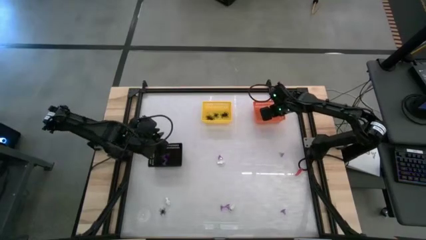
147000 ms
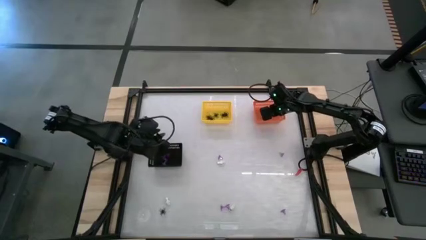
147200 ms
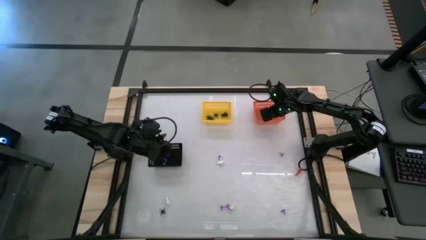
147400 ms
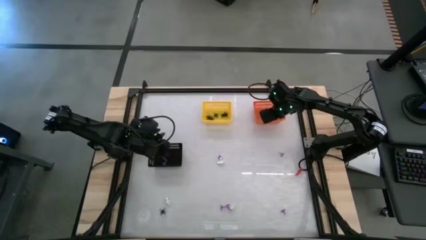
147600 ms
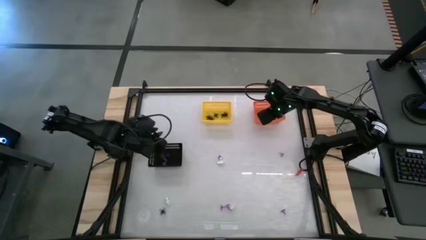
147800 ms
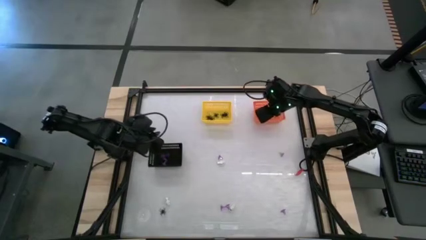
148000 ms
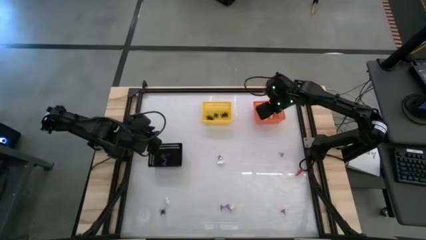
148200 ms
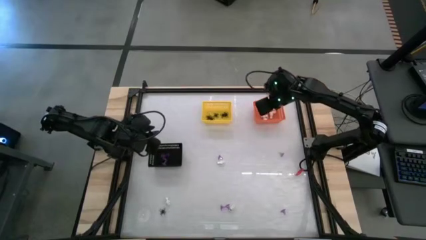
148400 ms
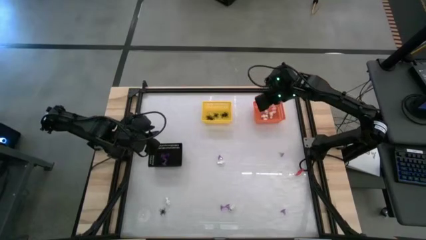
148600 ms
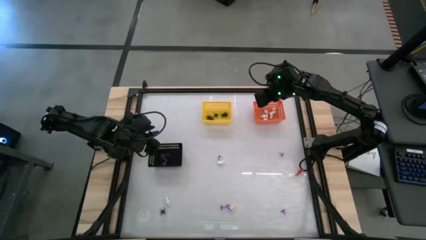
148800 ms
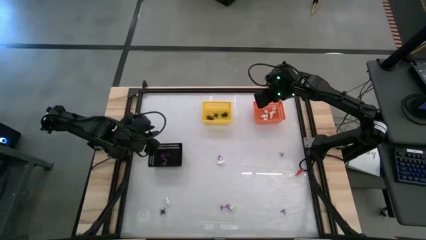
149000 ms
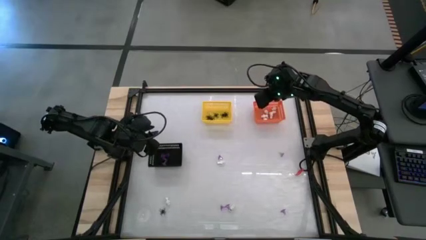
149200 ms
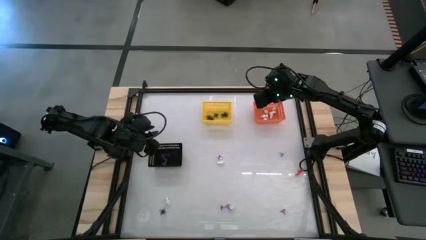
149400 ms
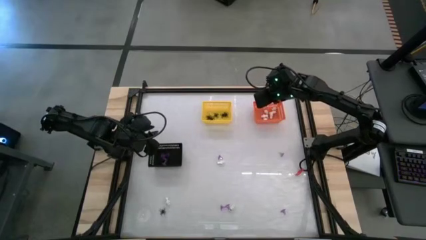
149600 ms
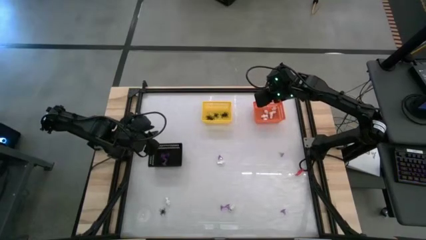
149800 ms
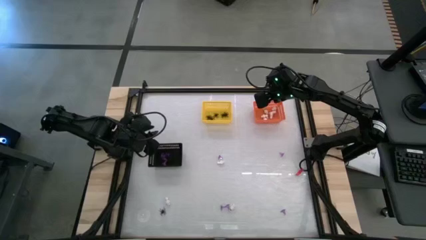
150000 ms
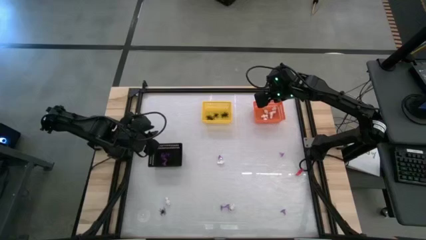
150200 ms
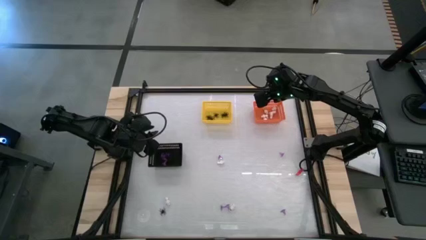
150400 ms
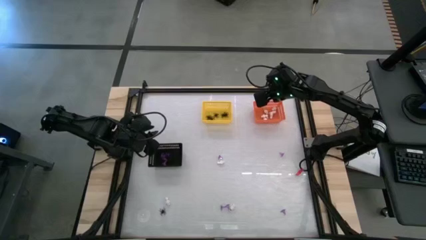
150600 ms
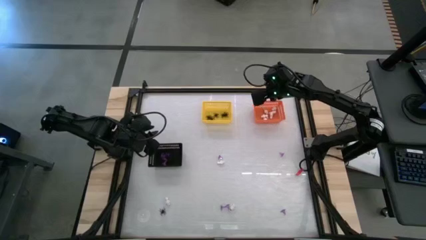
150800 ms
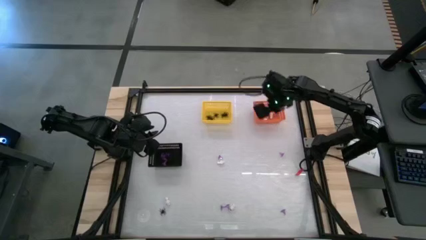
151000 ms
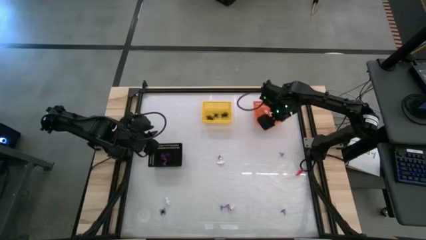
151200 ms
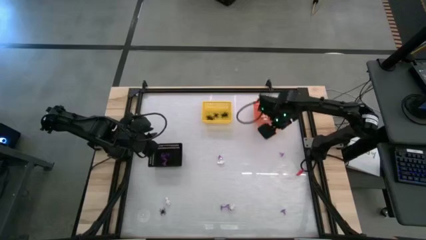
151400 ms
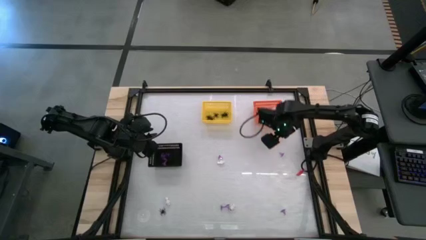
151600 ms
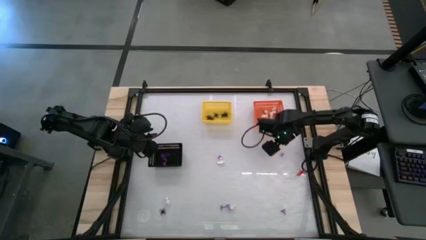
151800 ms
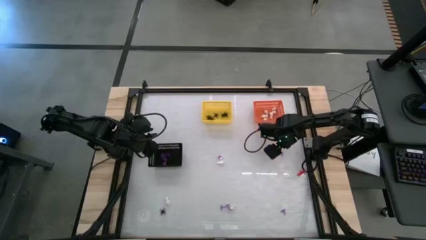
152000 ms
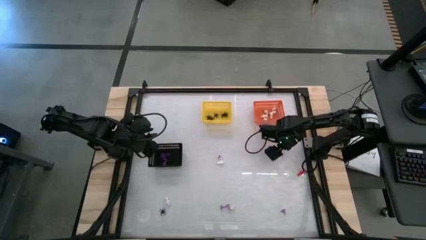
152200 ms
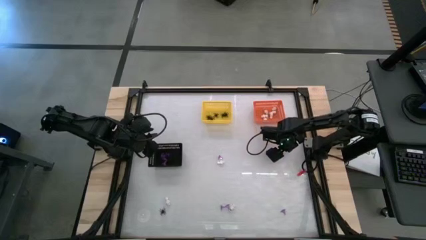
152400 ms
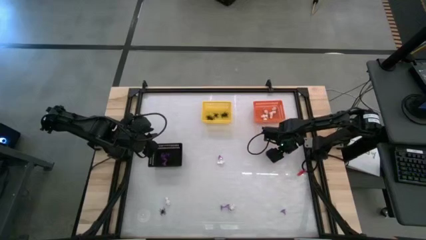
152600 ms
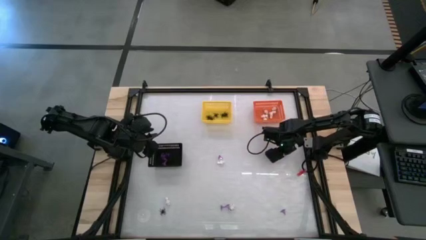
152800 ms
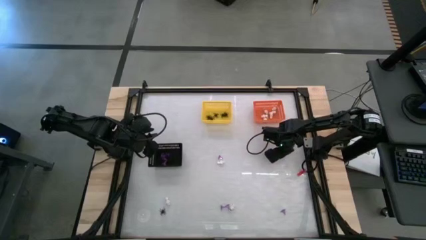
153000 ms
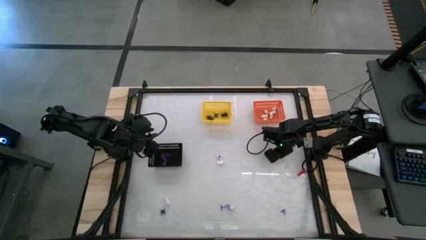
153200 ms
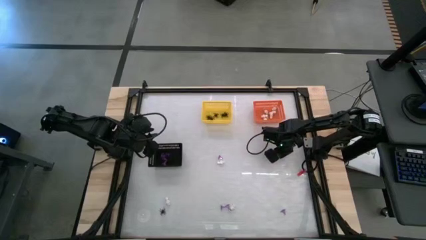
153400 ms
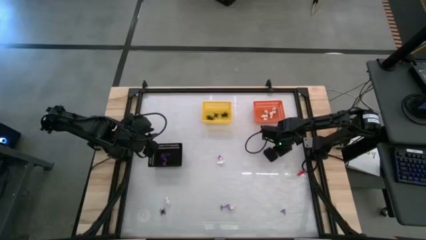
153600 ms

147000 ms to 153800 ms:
Task: Sort Halloween decoration
Put the purple hat toy into the black basket

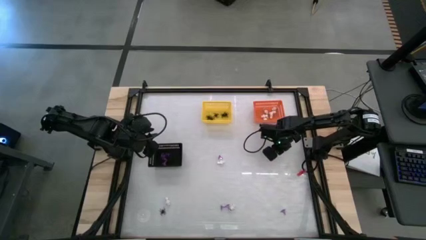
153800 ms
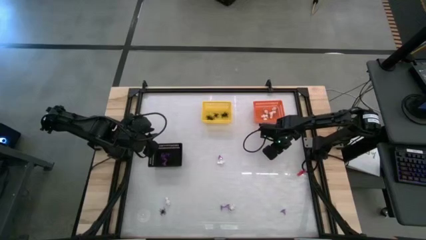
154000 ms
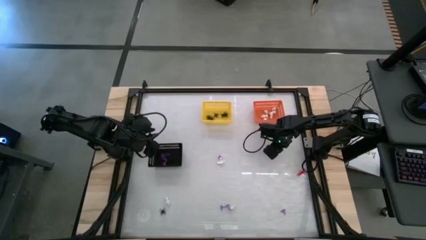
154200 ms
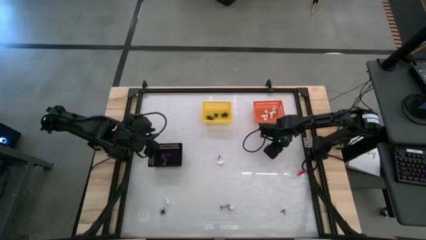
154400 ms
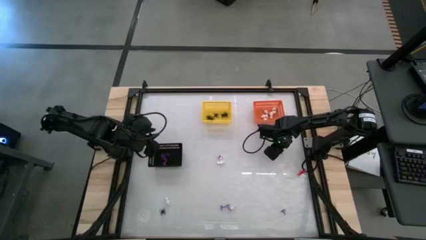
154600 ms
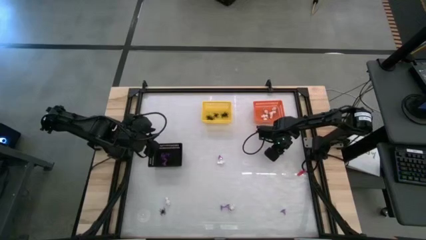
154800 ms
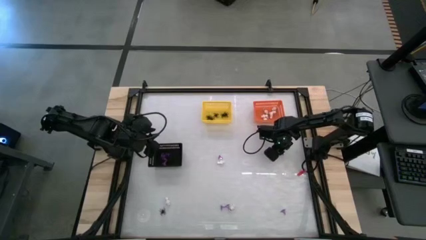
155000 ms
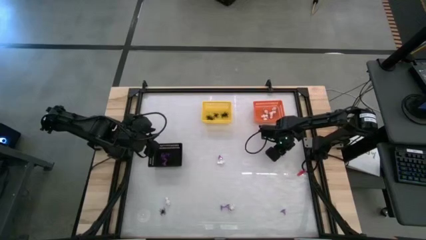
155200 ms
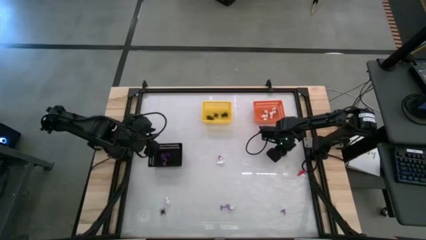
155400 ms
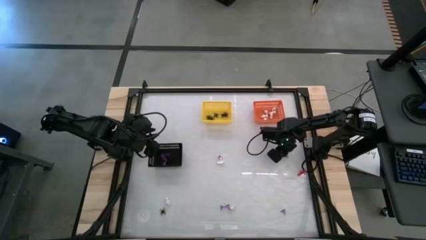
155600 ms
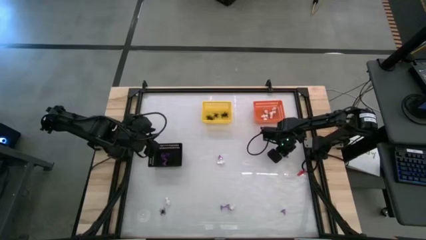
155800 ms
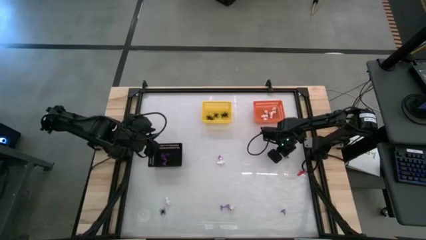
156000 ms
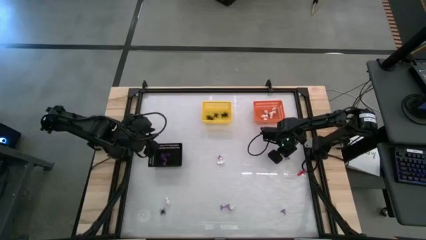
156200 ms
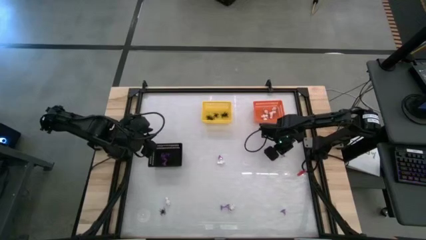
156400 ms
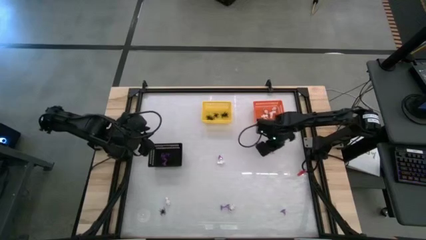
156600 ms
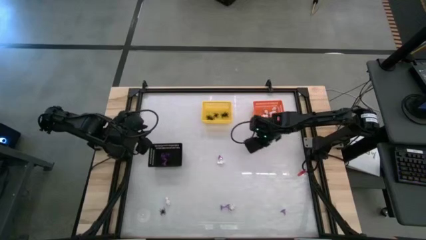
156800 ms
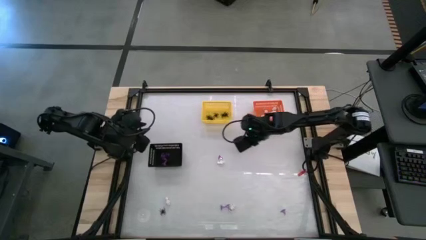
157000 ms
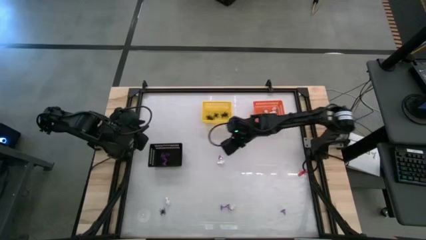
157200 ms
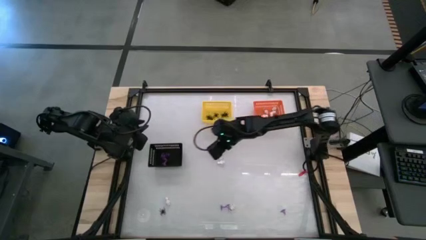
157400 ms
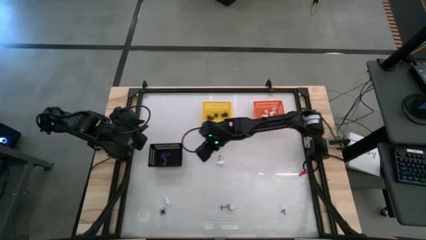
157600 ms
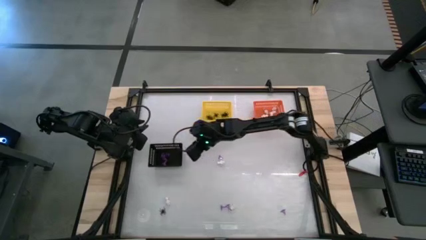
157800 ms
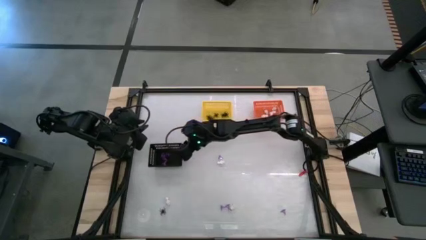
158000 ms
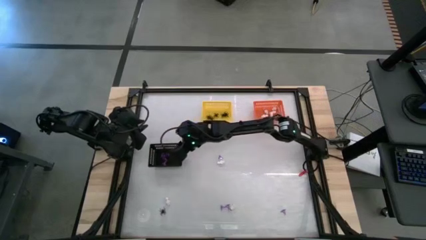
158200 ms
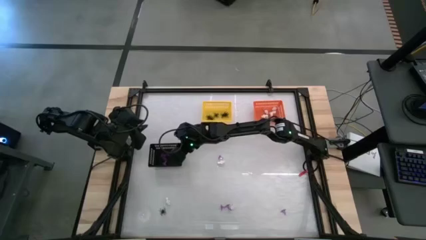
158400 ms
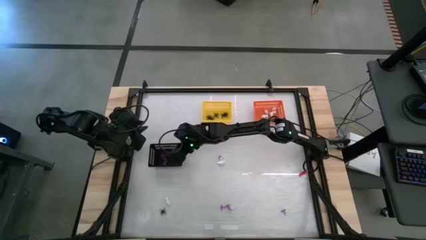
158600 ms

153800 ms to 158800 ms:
Put the purple hat toy into the black basket

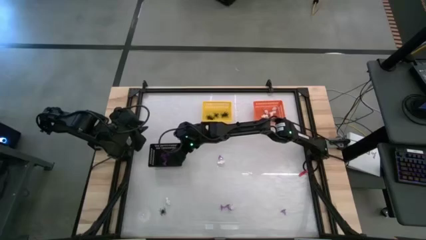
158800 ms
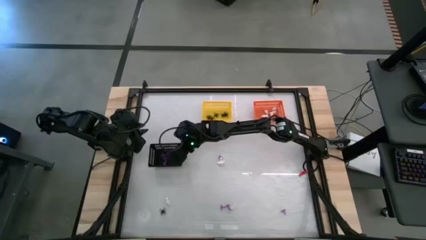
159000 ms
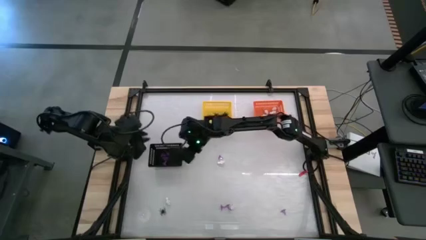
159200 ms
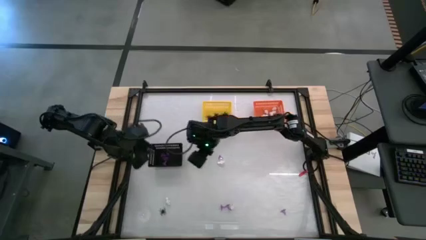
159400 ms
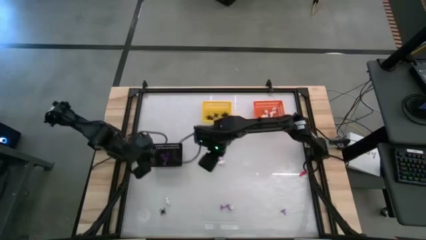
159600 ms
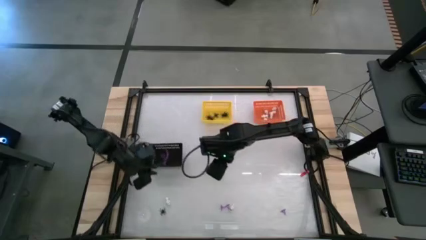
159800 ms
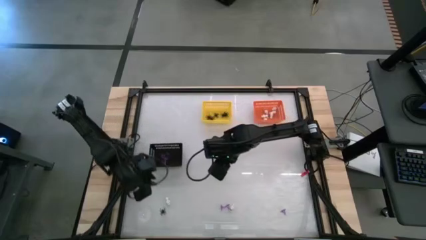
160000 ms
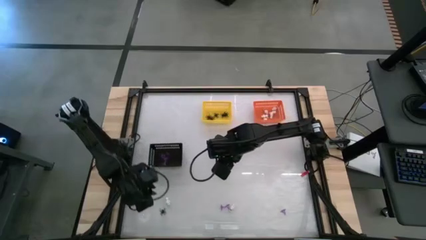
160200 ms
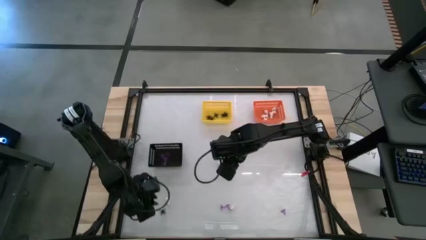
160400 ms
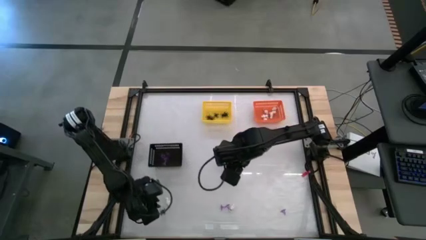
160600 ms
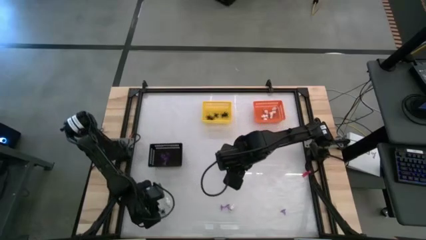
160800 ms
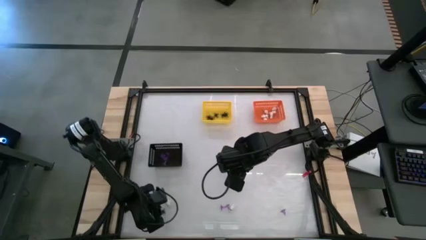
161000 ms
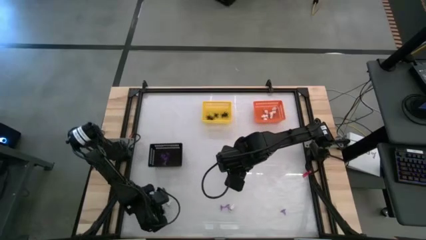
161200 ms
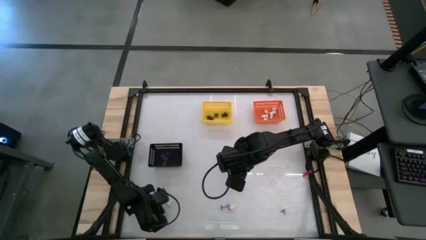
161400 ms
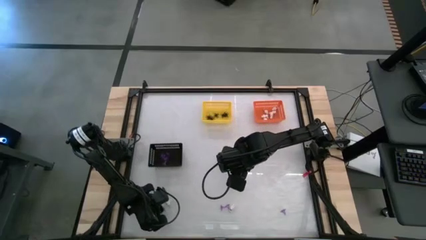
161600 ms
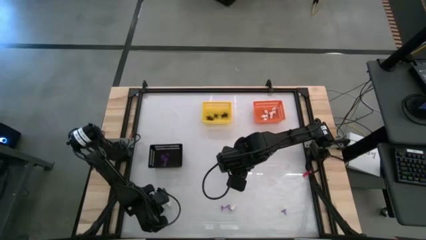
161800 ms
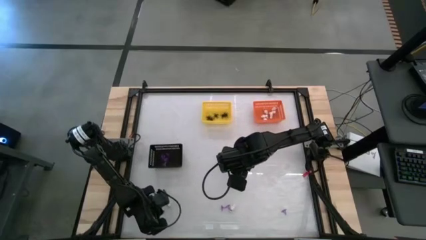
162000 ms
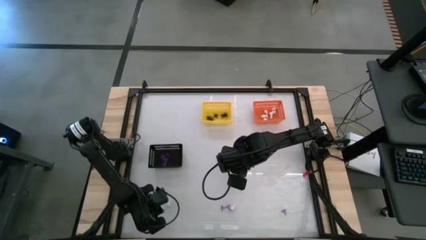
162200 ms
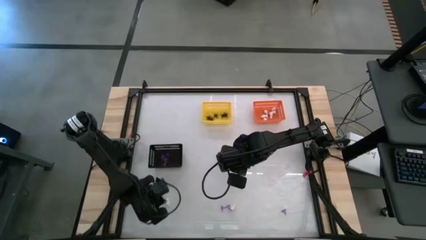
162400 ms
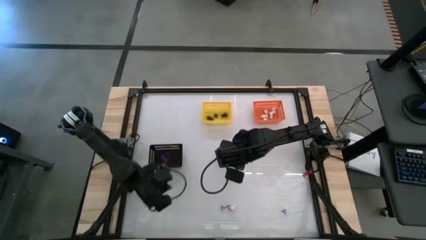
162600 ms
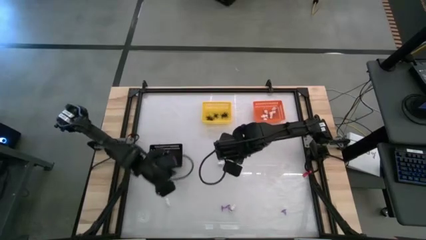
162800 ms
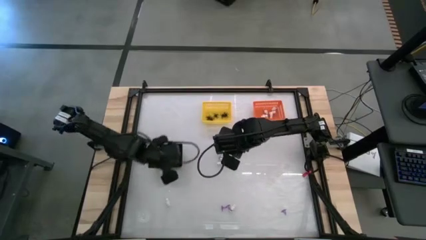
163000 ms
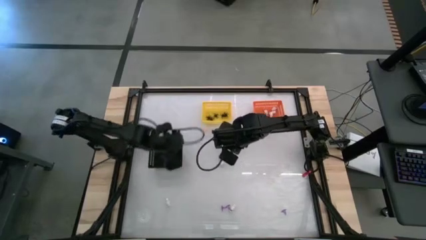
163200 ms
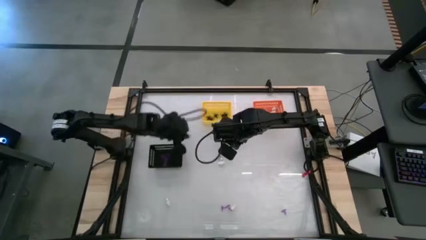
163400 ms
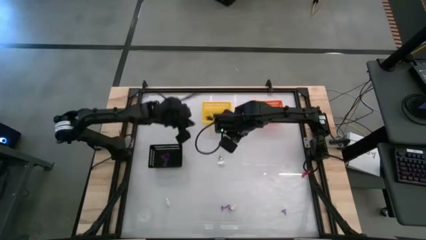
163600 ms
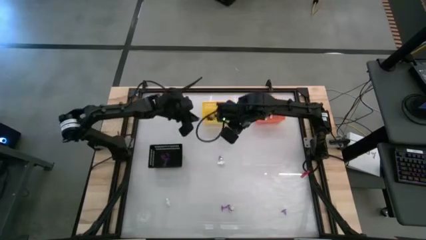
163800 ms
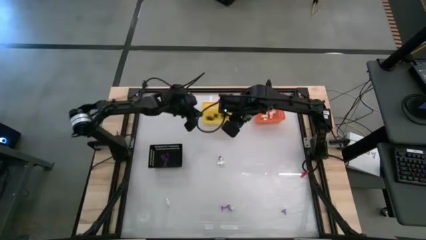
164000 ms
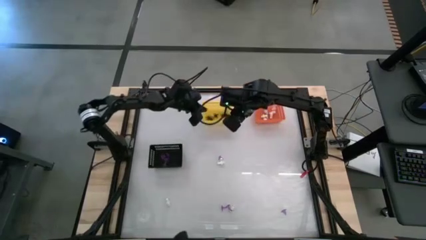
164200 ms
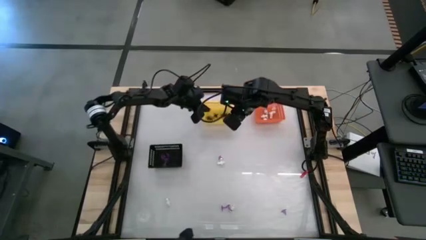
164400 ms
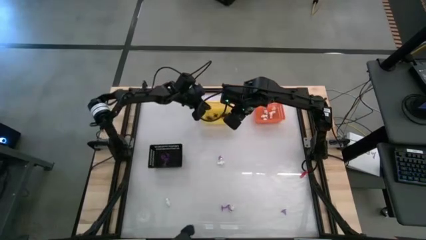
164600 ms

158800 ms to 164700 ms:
Put the black spider toy into the yellow basket
